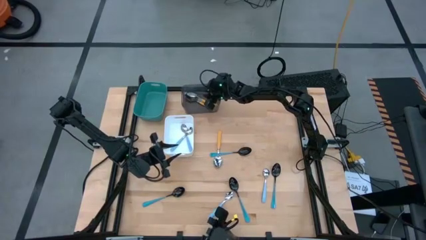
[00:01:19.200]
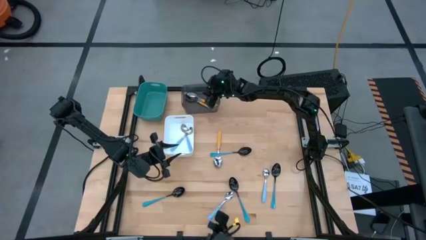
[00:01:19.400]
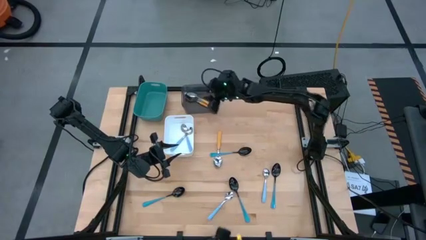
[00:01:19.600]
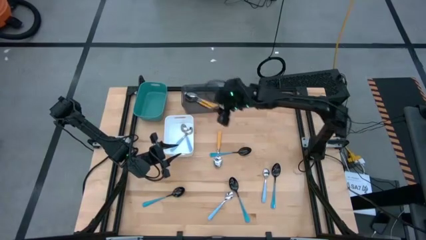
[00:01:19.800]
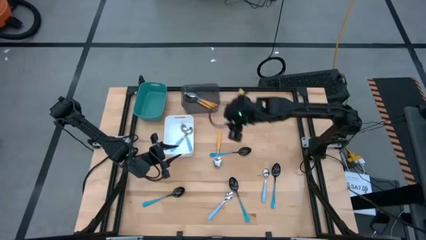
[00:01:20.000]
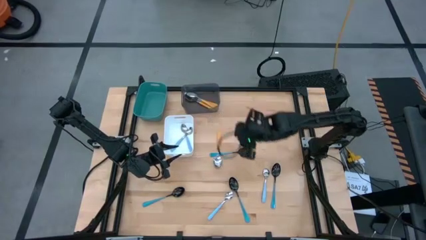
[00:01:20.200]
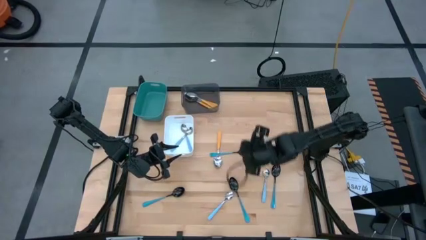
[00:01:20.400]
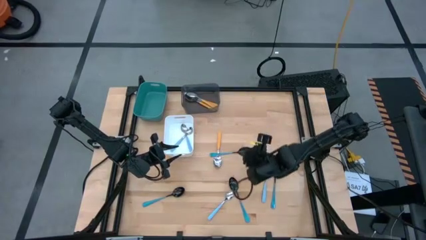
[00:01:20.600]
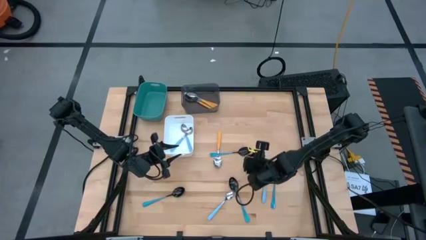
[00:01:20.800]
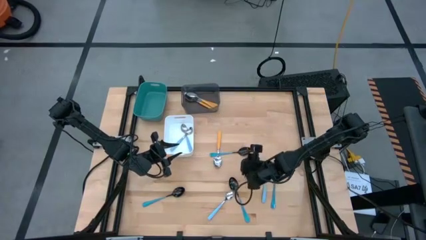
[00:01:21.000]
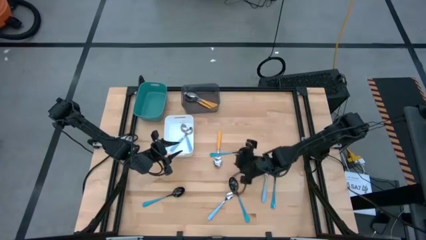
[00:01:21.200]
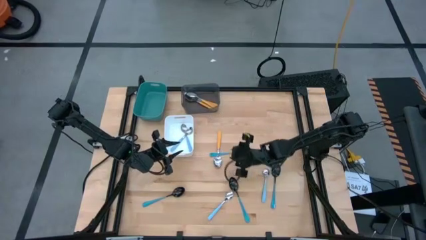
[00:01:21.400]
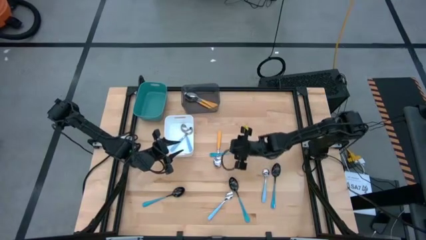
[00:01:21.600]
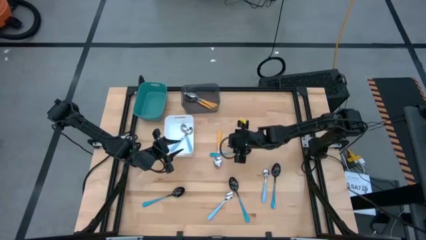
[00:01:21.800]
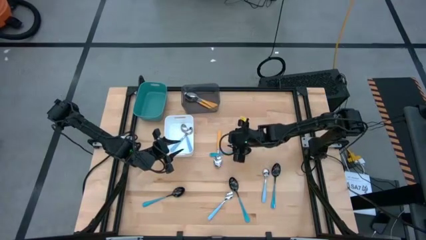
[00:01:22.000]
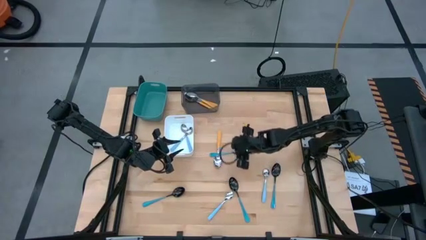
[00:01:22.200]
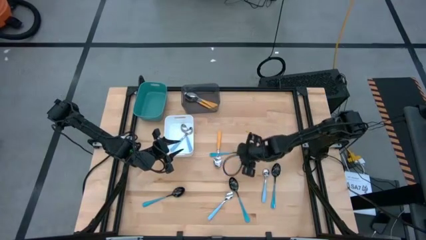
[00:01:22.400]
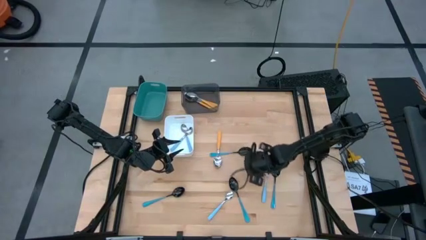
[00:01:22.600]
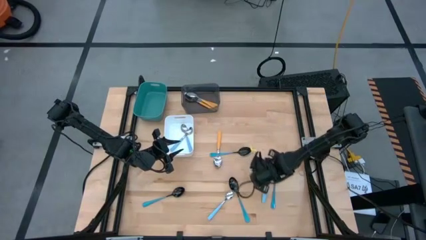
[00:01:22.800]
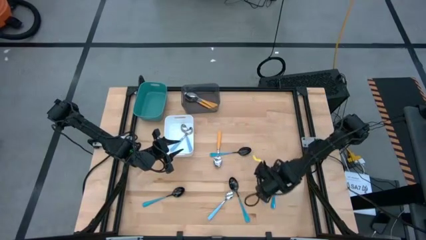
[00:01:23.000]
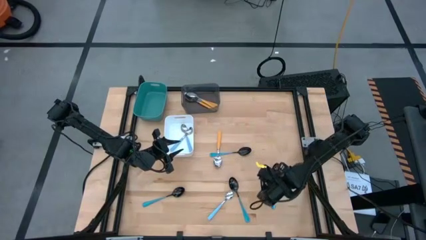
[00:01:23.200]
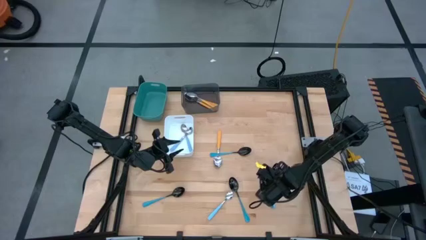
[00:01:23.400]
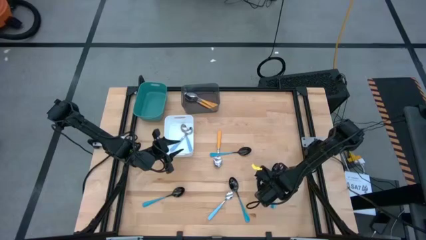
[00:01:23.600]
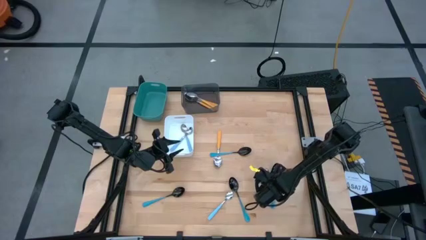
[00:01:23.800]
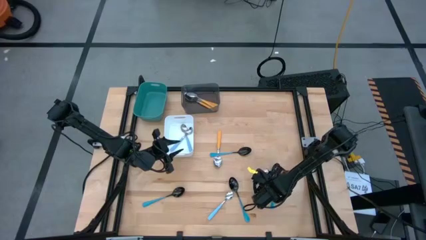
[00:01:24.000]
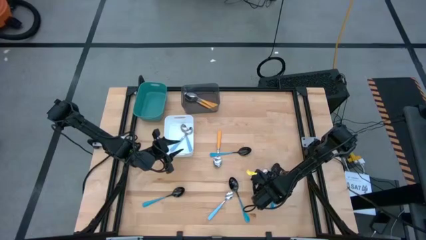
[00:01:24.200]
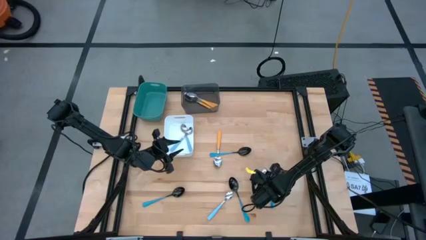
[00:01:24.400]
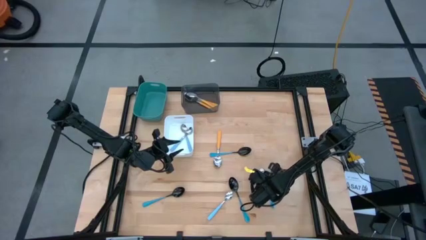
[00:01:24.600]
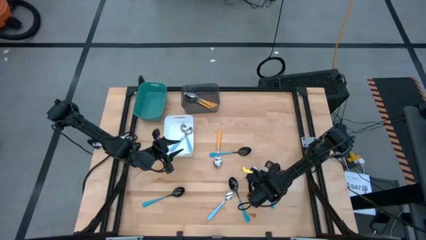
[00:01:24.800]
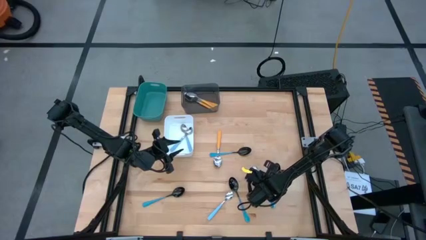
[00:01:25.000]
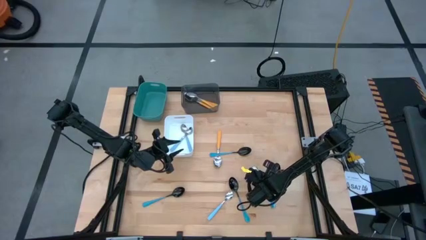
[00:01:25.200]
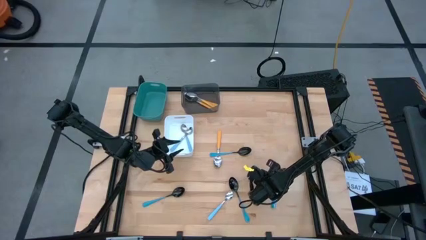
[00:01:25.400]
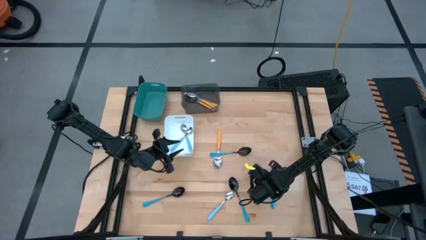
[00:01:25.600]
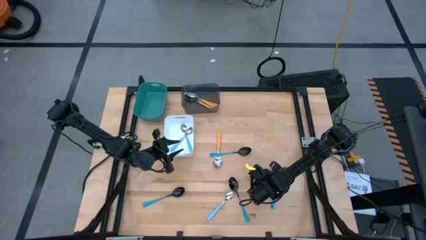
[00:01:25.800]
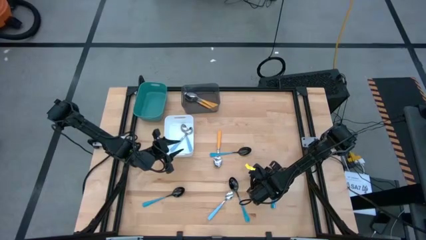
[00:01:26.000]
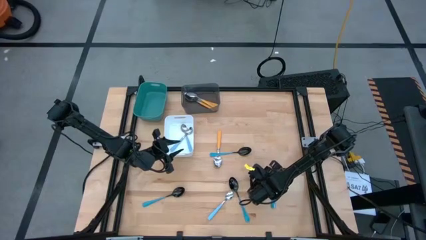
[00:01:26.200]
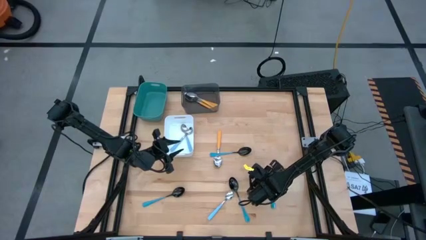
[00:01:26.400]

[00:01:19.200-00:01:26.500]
Task: Sort silverware by color (type)
Put the right light blue spoon into the white bin

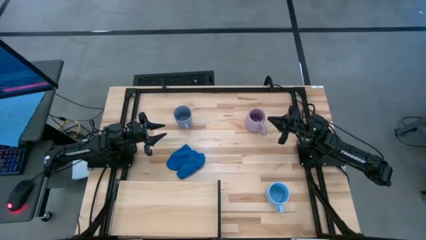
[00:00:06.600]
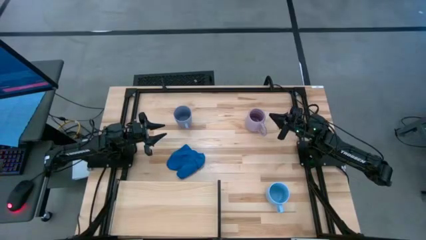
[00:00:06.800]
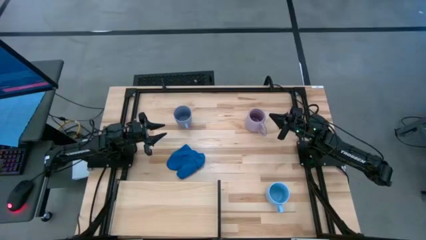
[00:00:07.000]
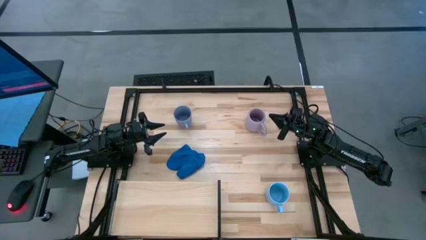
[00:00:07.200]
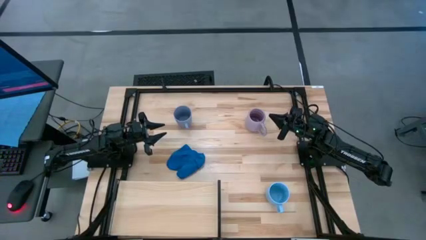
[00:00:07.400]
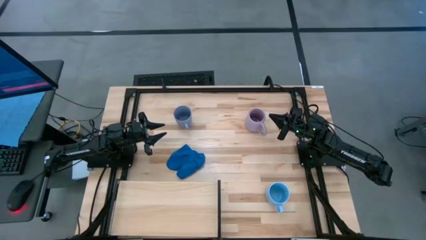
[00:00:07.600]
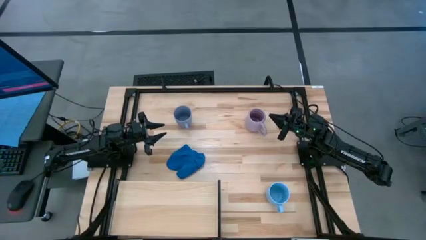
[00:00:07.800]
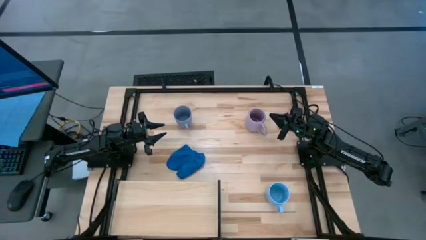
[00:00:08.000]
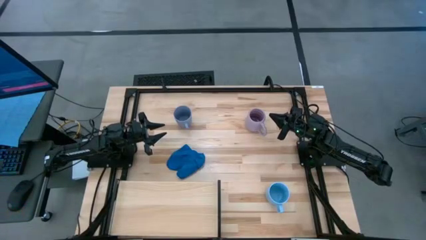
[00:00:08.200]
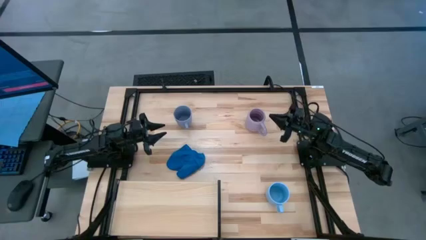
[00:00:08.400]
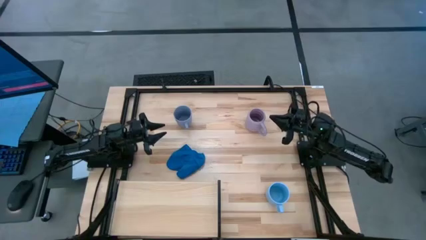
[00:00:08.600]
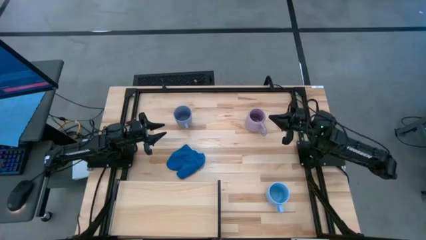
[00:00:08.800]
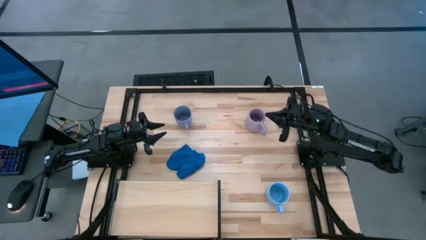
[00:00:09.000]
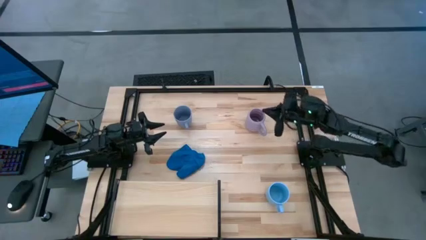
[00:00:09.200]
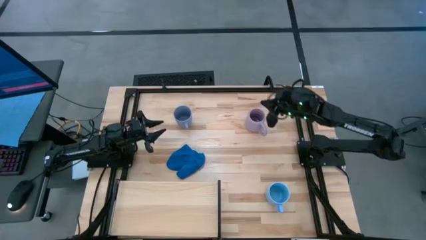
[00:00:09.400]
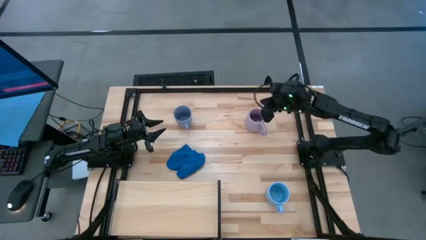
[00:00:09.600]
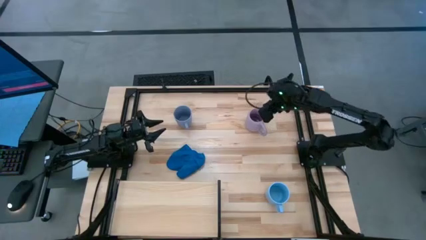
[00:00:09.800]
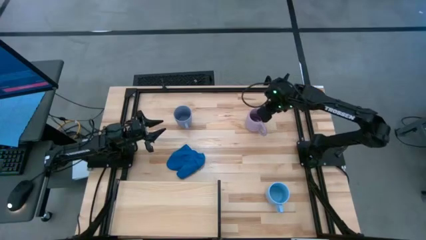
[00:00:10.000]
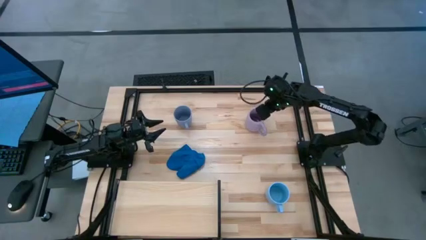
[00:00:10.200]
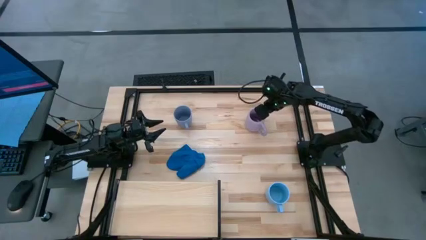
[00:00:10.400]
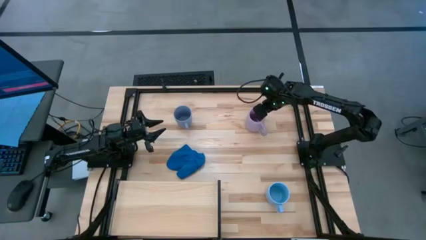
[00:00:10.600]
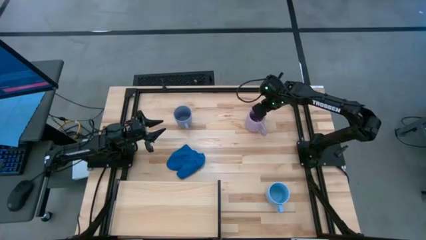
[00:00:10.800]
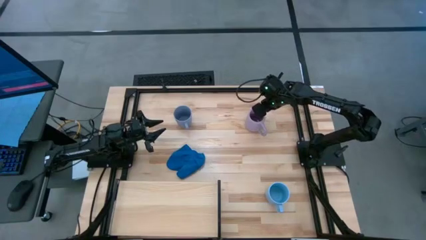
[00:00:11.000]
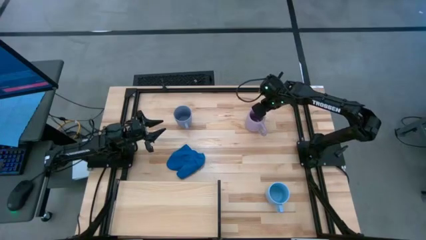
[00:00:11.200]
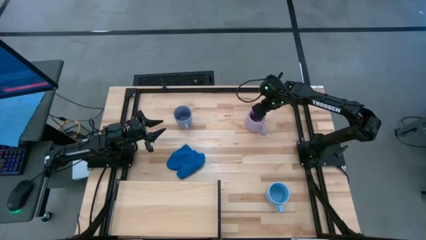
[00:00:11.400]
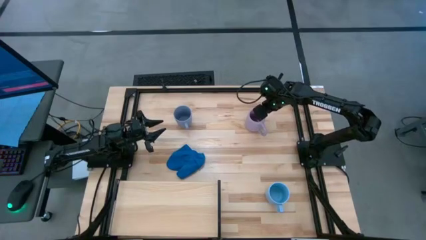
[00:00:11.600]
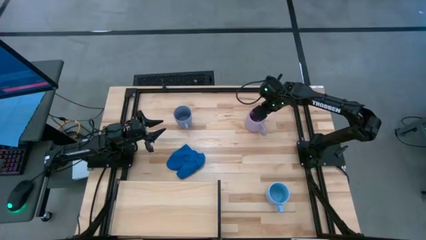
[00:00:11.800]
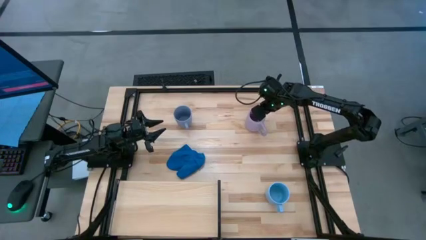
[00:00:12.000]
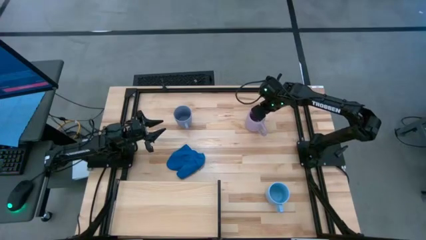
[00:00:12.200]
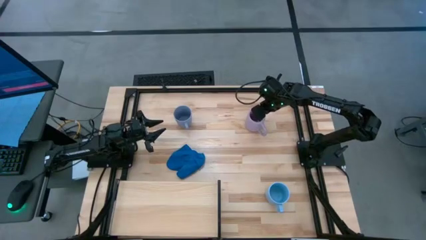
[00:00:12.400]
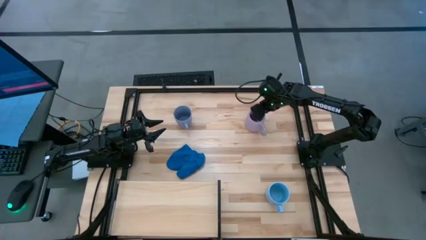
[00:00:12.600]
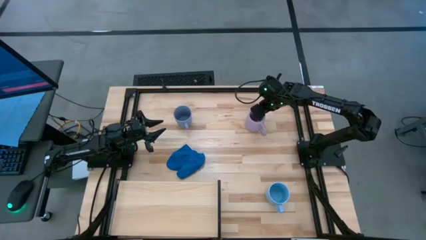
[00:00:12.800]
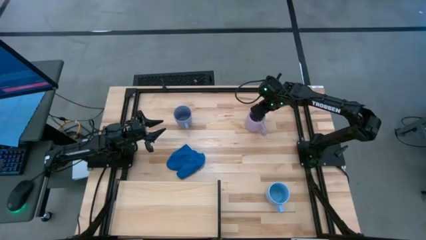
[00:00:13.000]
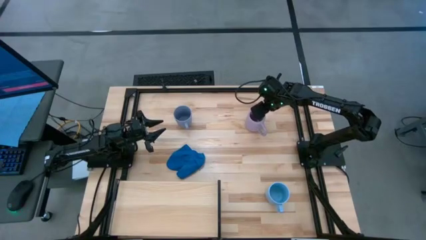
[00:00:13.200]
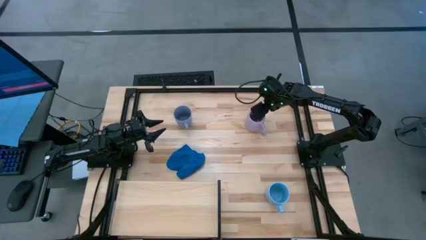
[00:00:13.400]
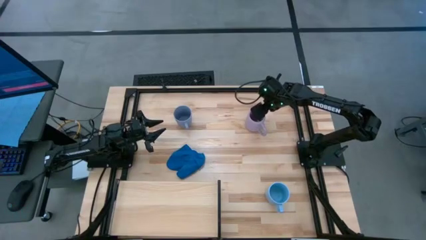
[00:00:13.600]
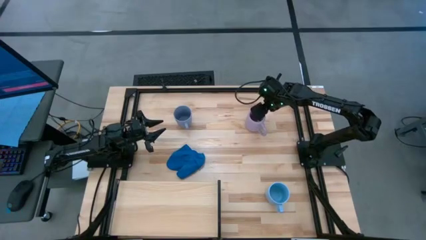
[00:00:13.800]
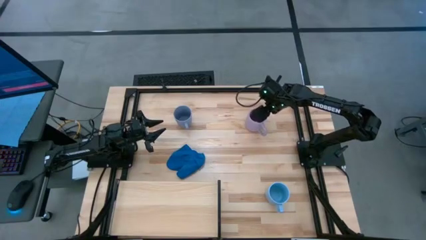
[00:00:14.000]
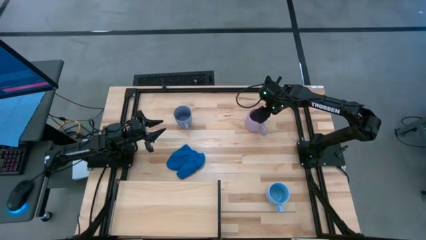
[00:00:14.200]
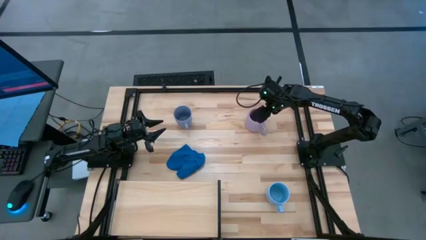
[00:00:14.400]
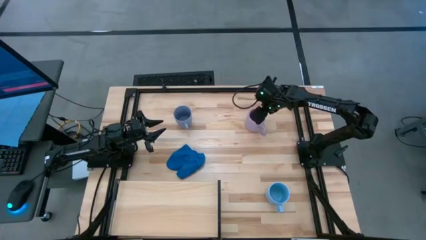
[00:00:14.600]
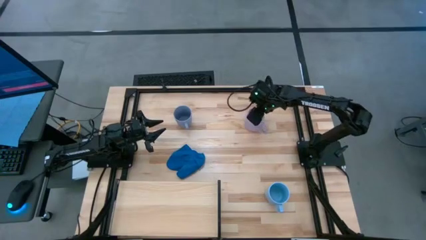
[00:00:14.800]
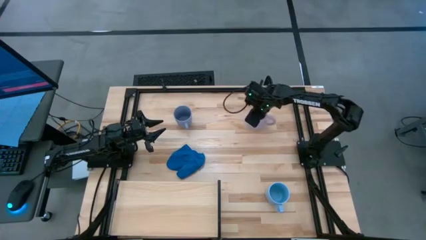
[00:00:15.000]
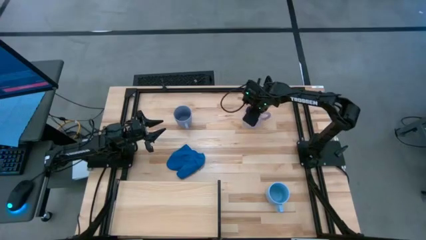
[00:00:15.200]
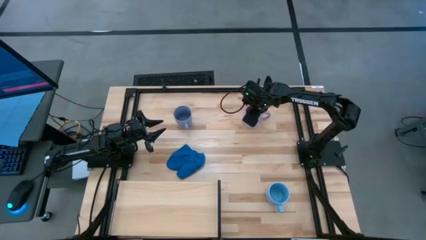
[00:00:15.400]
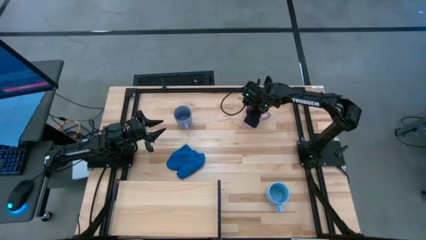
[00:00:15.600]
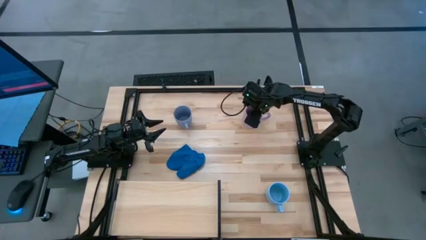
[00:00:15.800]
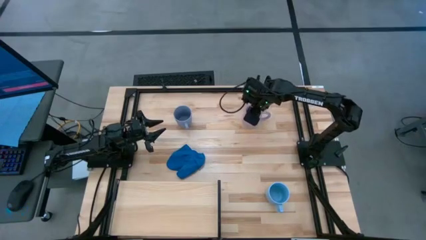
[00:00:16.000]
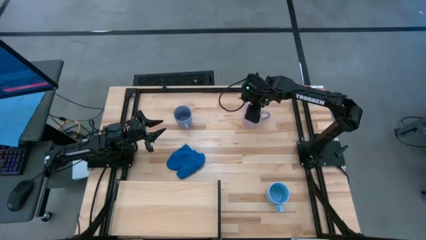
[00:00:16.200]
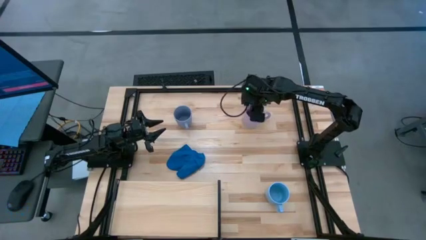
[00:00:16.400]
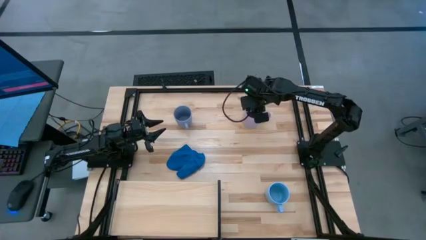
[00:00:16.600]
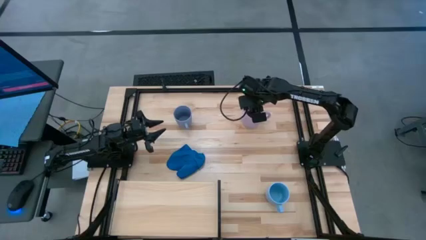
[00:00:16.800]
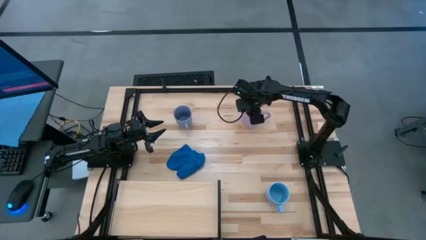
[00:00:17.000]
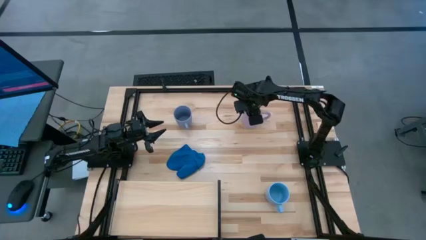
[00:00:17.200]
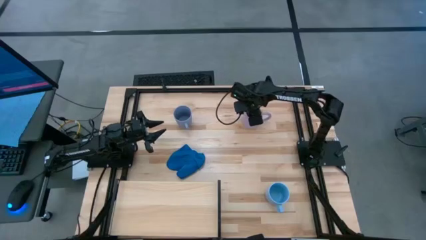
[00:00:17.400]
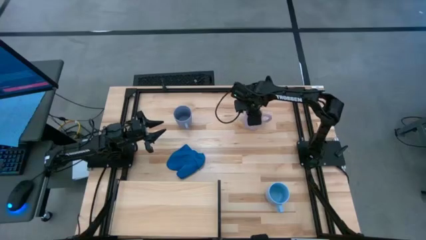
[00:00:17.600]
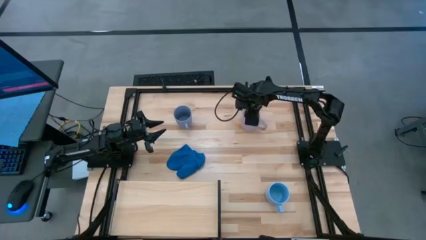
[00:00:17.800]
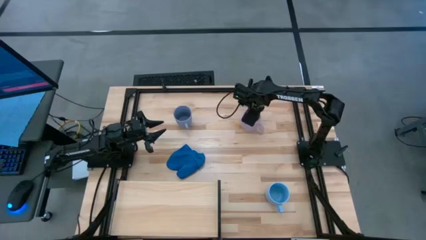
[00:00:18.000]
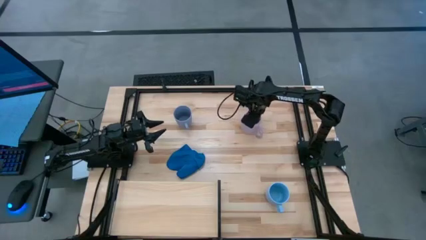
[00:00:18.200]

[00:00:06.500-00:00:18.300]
Task: Stack small to large cups/mugs on shelf
Move the violet mug from the top right to the center on the table
